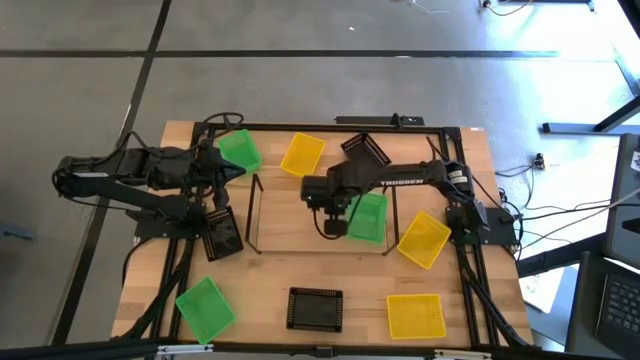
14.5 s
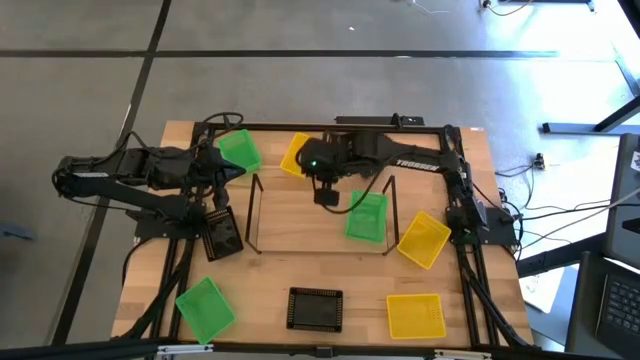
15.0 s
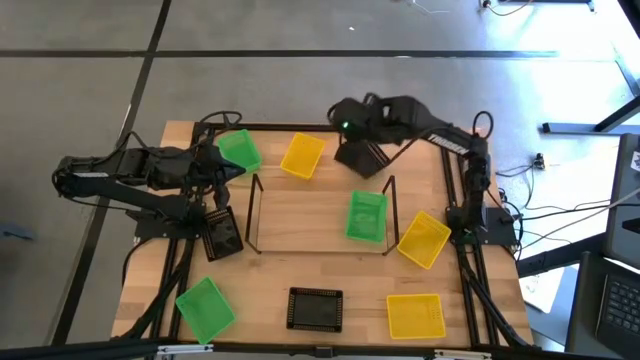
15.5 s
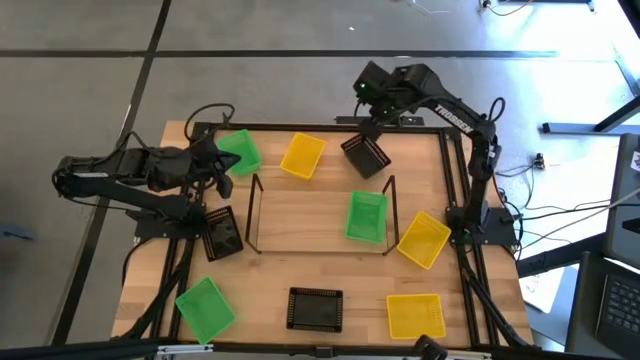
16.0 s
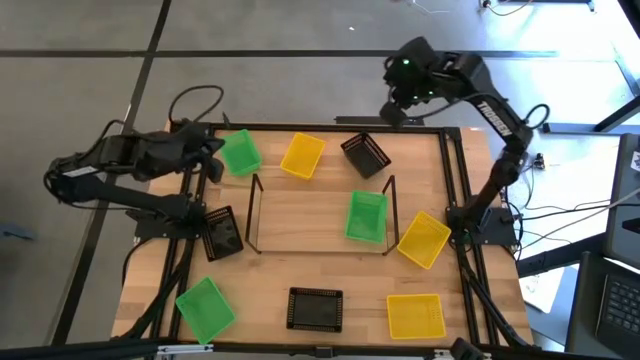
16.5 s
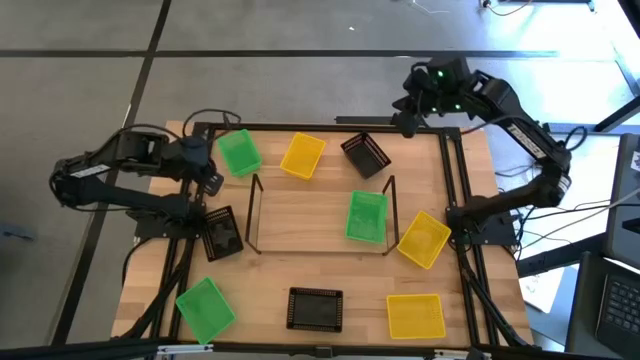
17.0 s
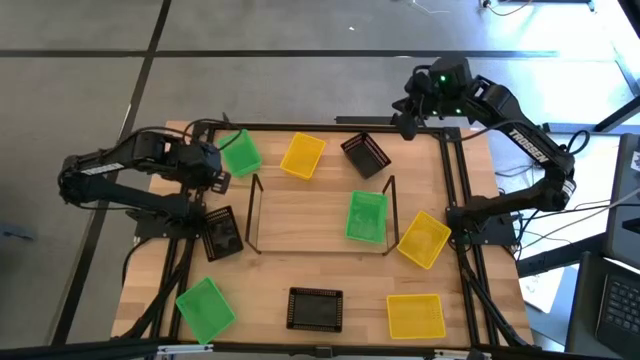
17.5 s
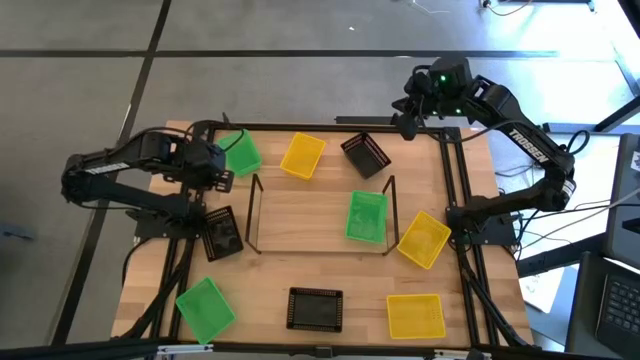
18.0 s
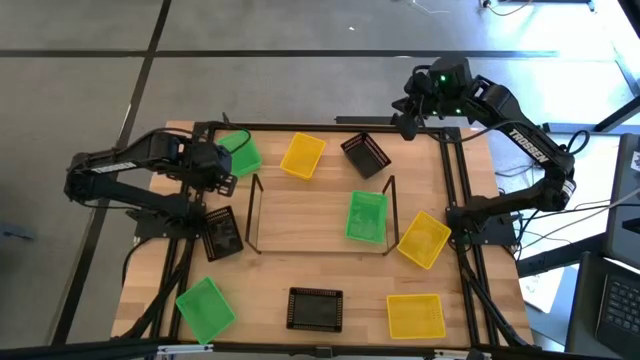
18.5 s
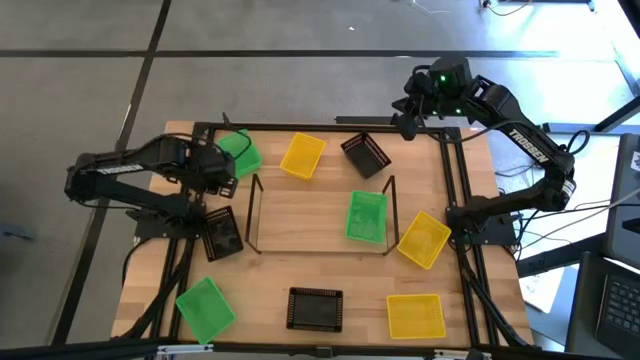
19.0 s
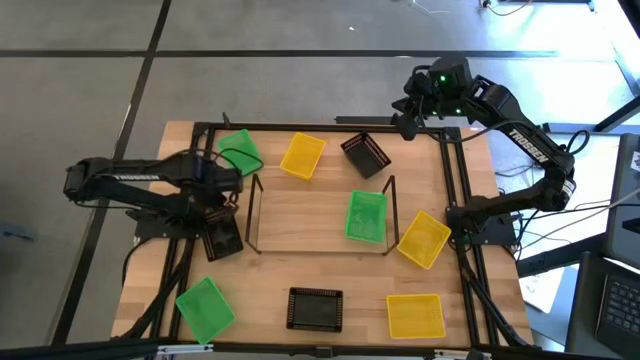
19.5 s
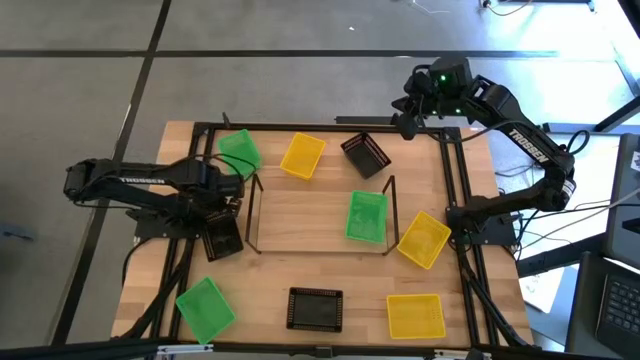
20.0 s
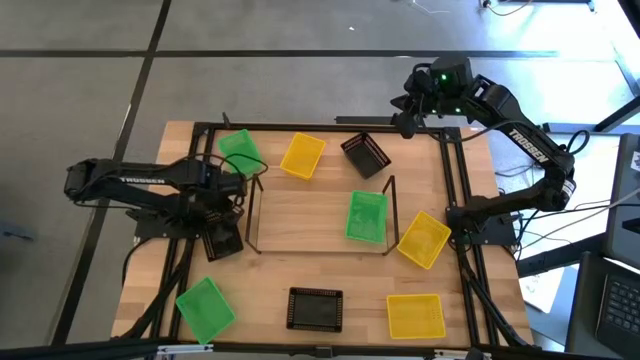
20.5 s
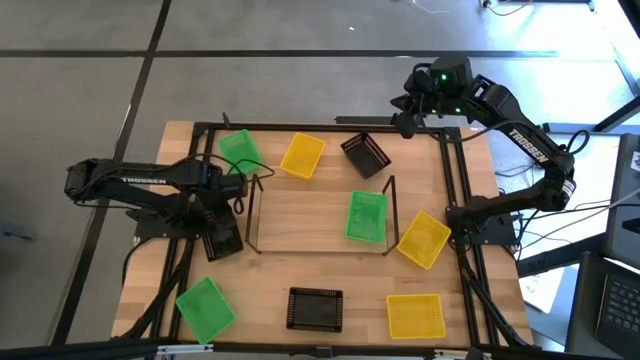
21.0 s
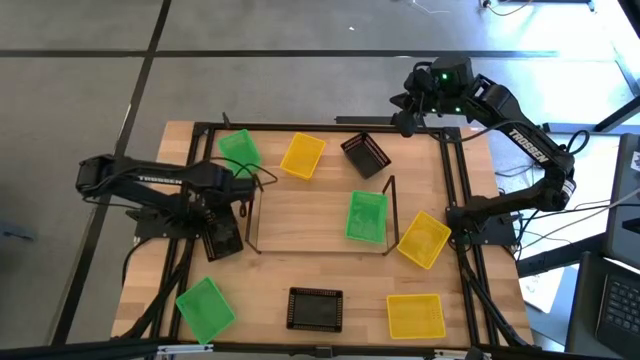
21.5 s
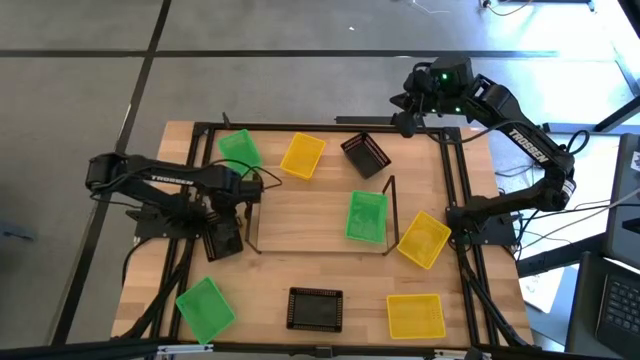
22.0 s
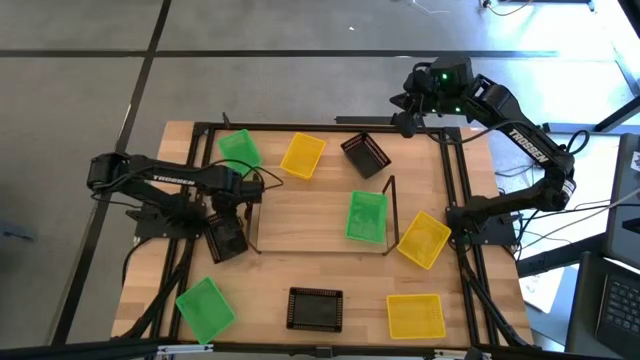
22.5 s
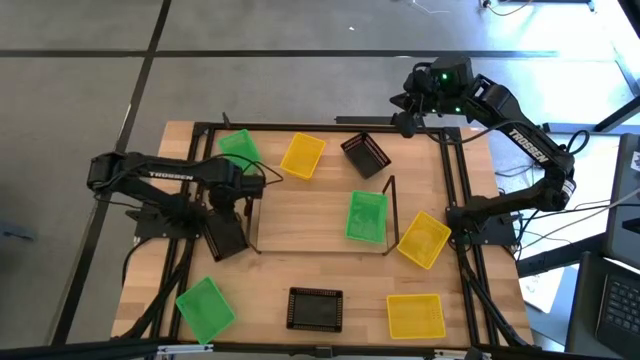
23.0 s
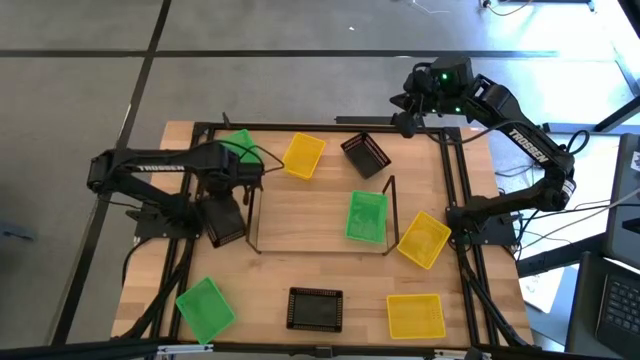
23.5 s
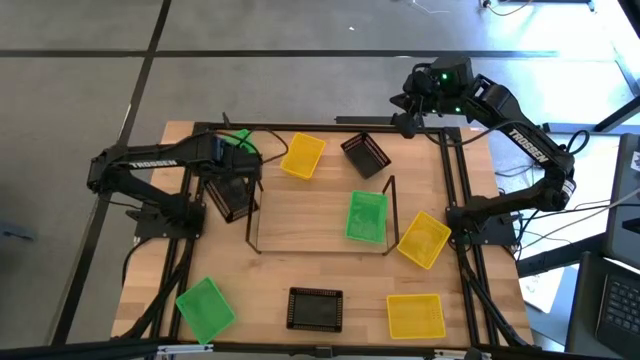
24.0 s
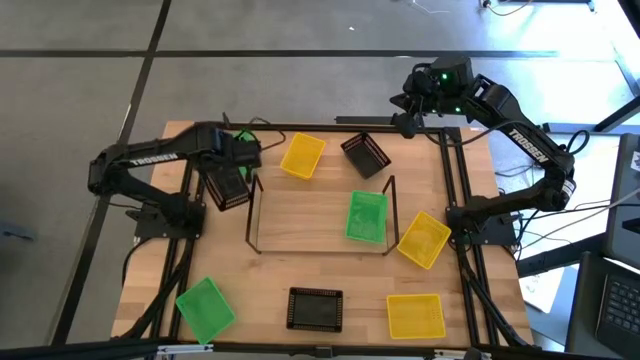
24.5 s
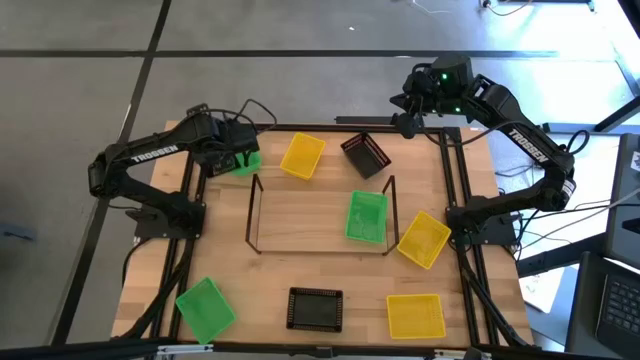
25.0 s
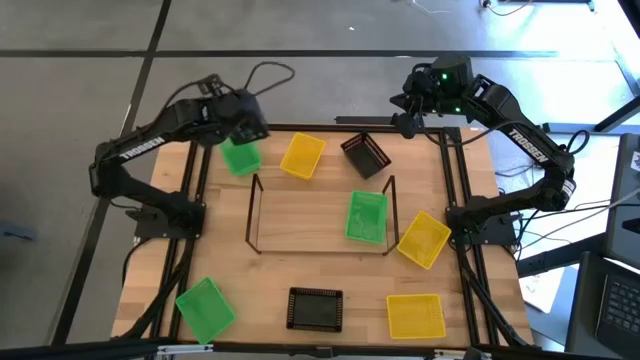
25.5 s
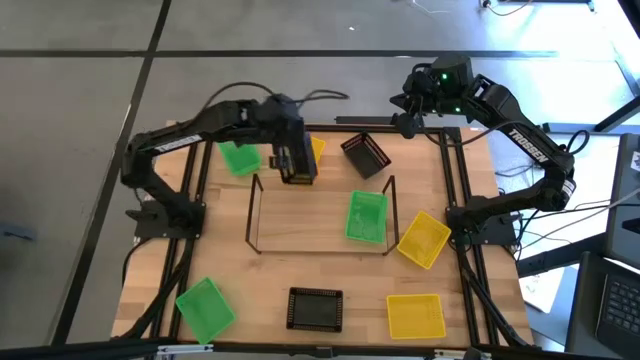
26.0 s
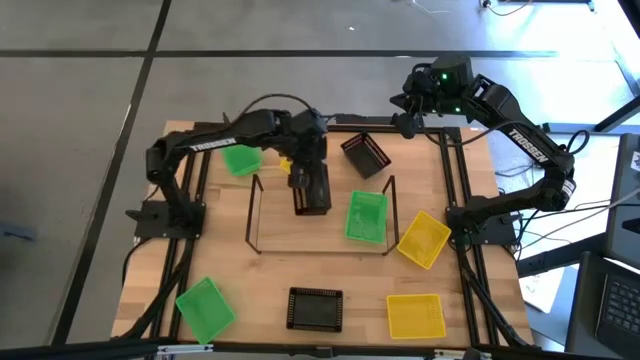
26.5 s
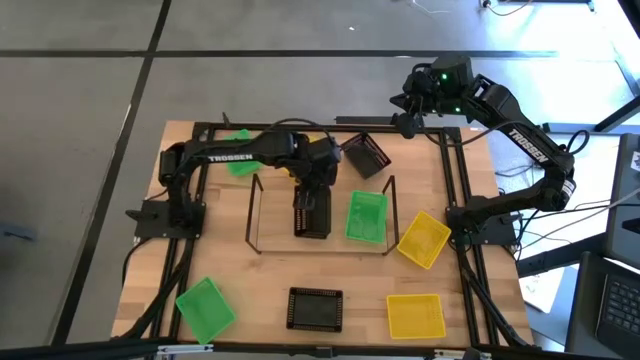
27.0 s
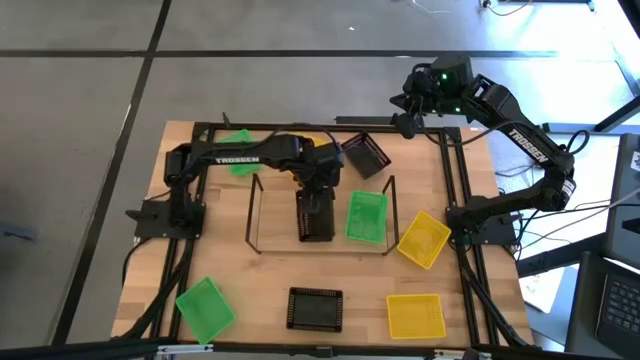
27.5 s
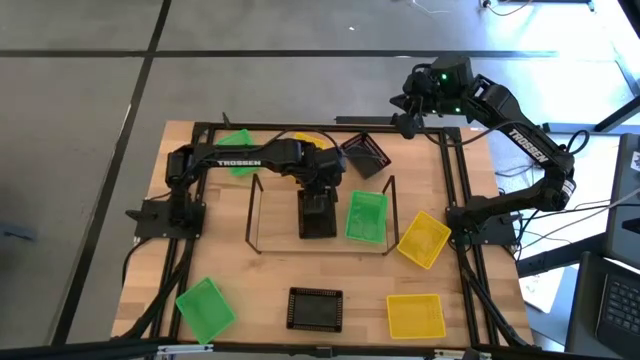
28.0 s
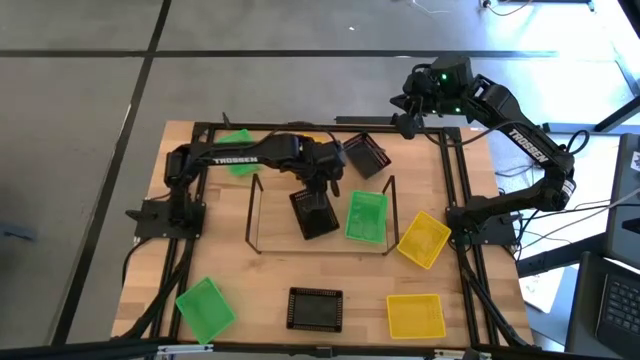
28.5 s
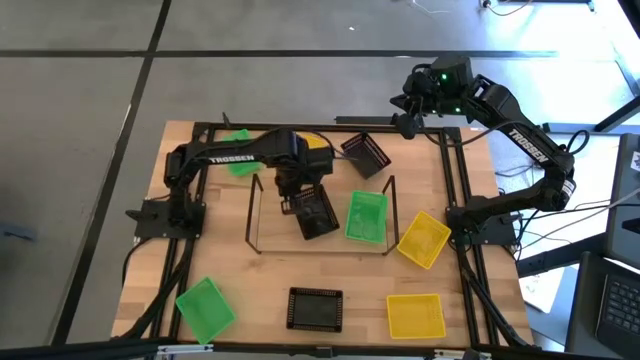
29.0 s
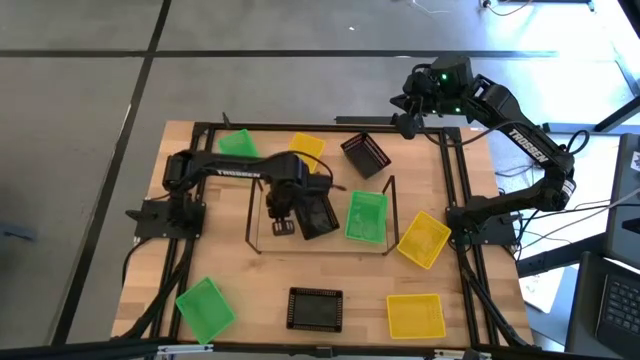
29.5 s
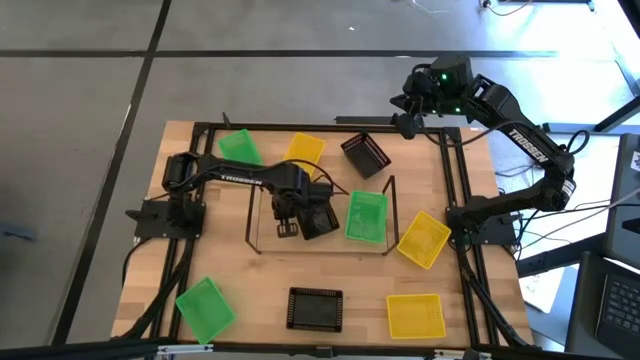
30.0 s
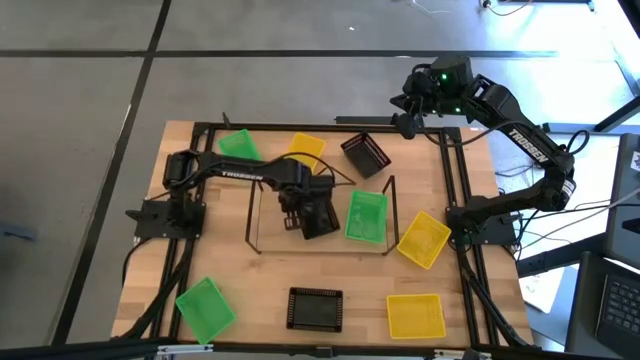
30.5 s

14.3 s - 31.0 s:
Task: Stack baskets on shelf by color
Put the middle left black bin on the shelf

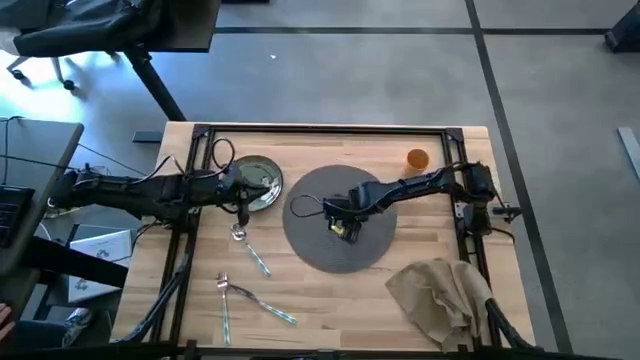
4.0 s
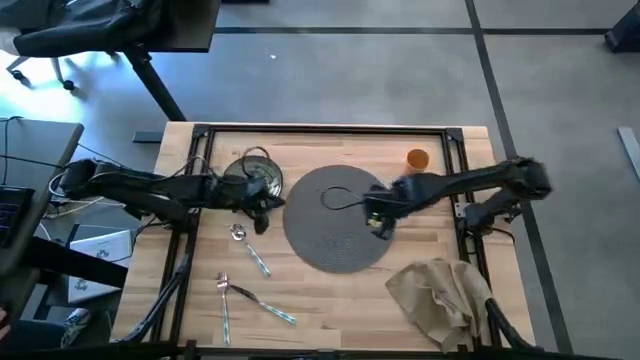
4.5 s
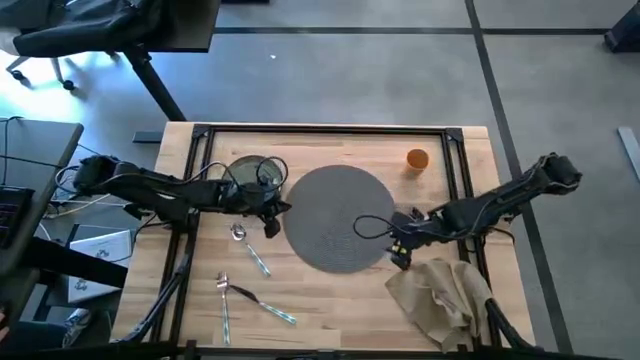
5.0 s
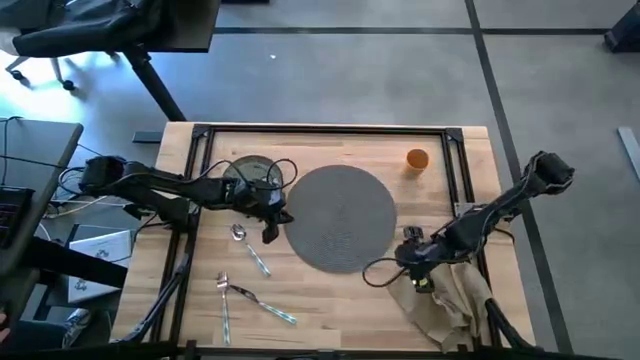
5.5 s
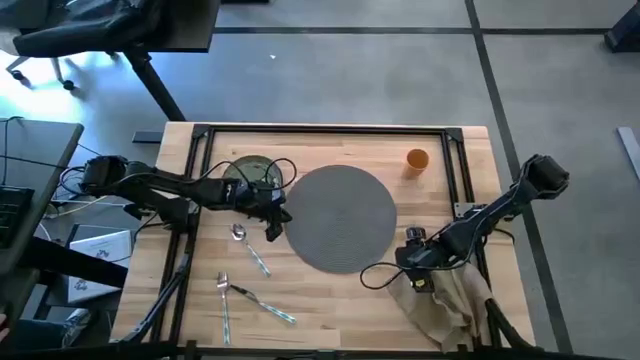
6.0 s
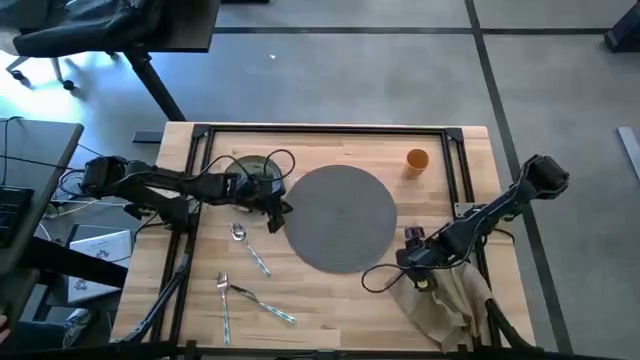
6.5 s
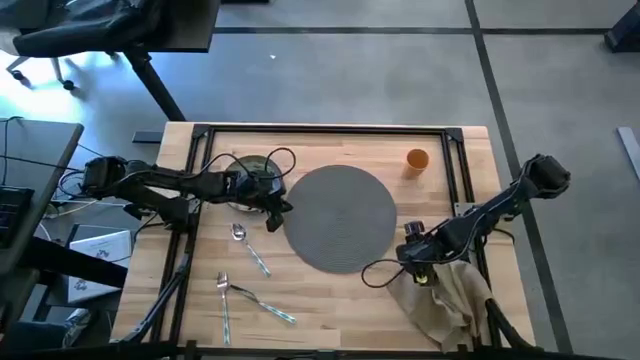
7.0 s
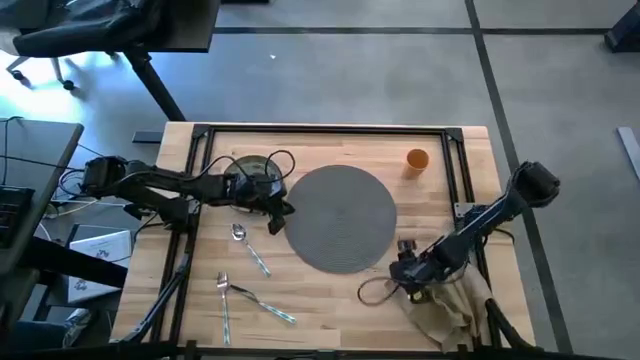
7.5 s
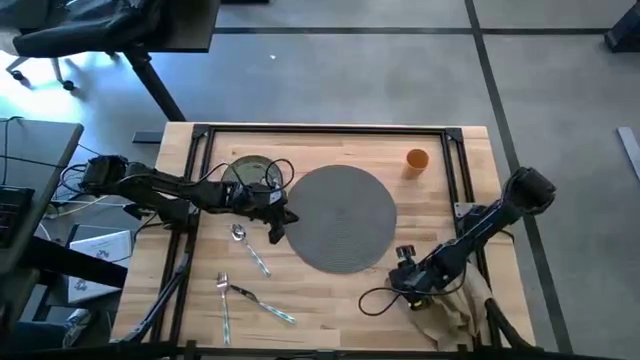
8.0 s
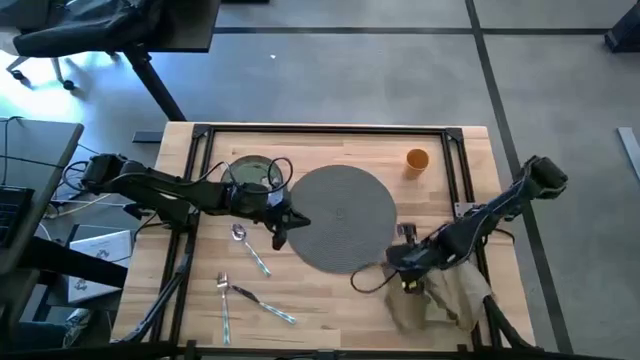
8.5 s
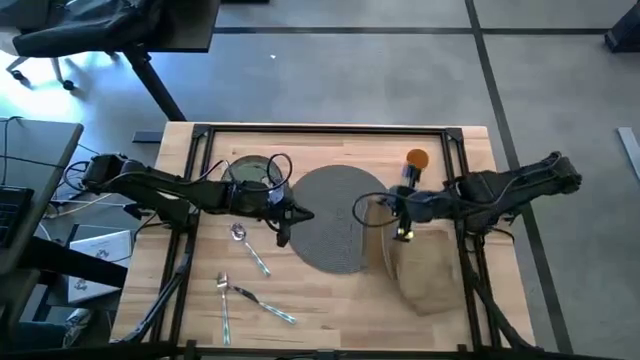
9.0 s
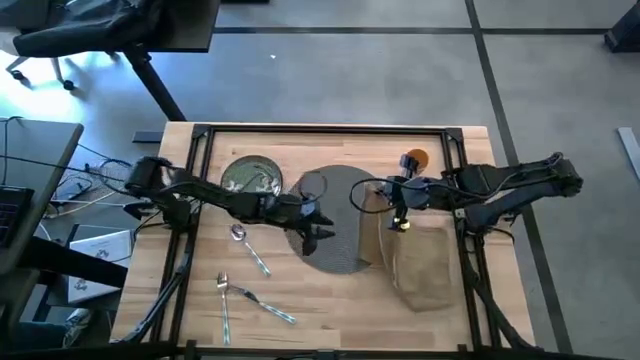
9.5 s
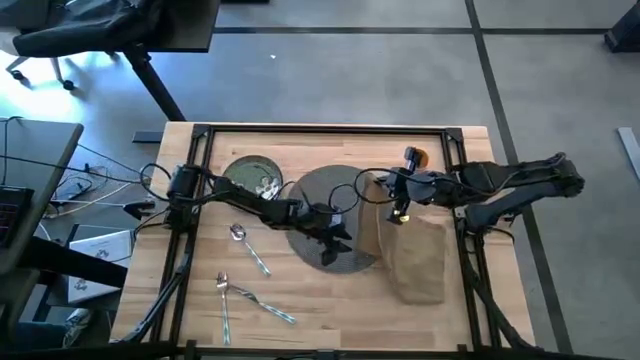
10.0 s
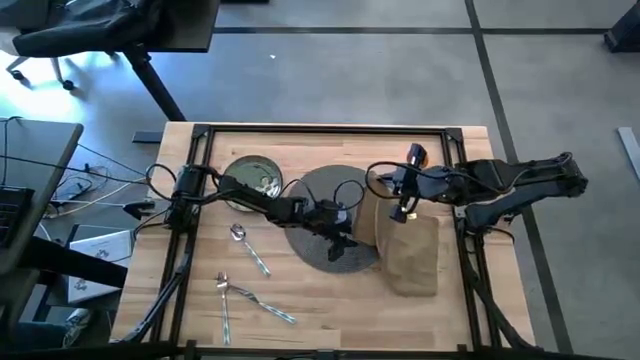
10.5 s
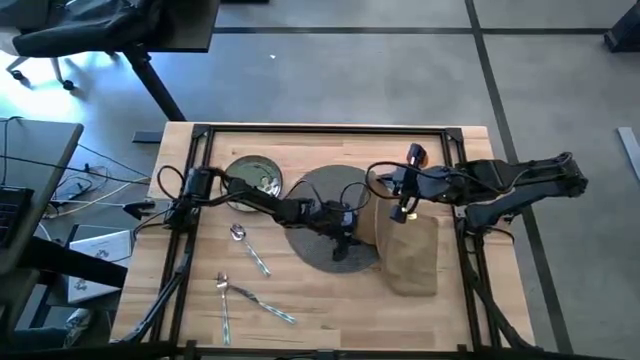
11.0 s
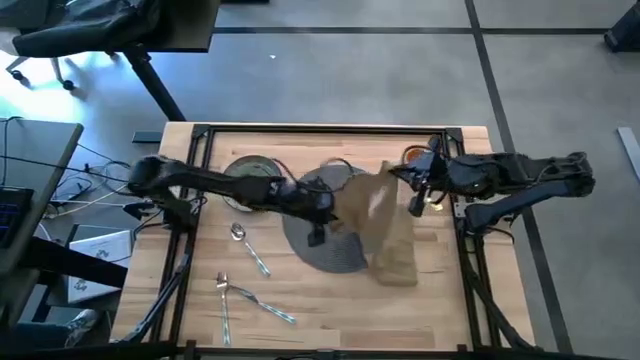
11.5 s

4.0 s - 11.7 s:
Task: Set table place
Fold the brown table napkin
